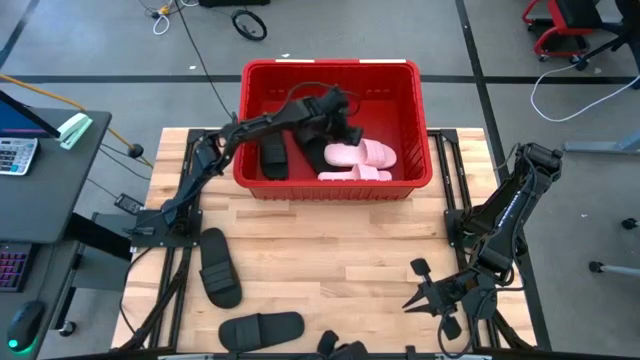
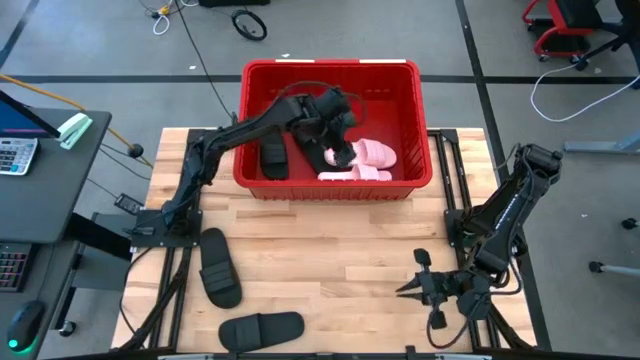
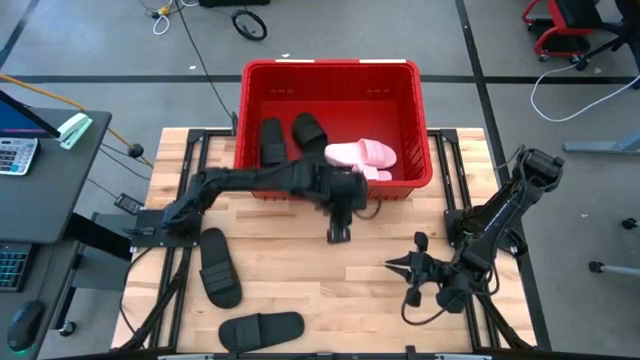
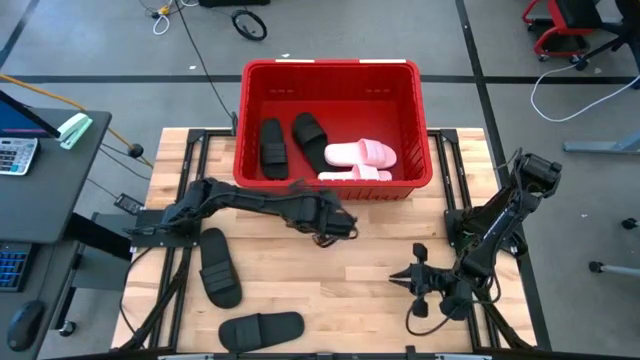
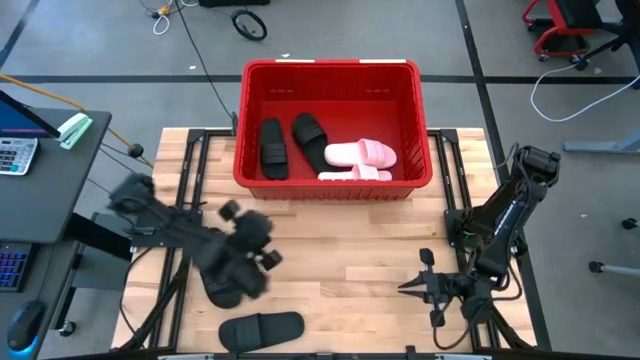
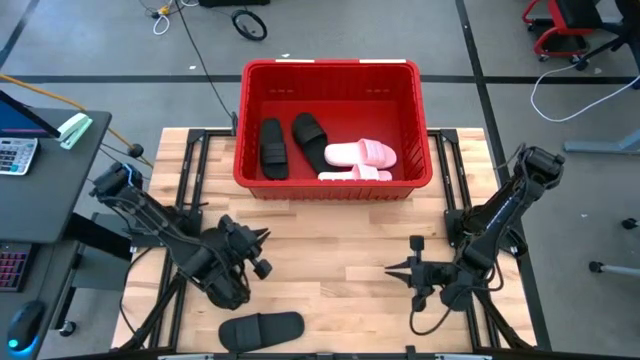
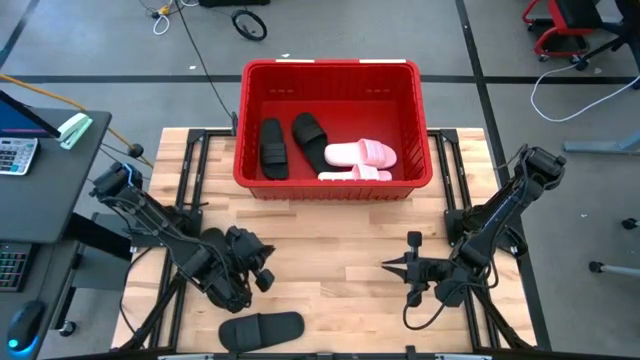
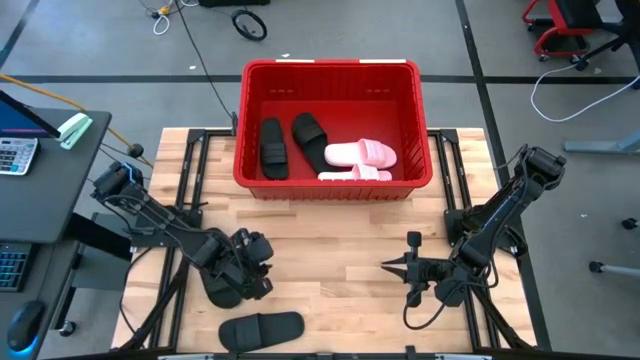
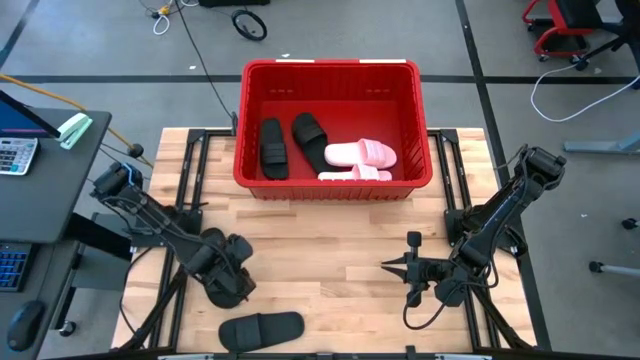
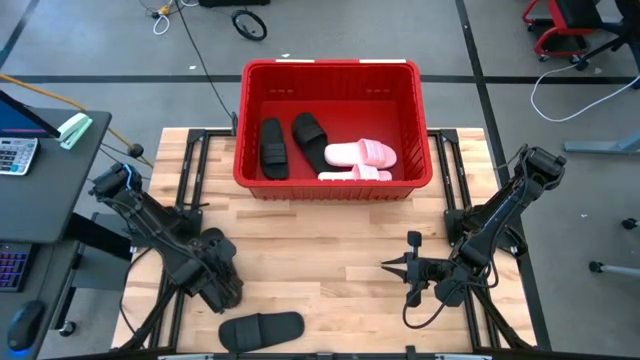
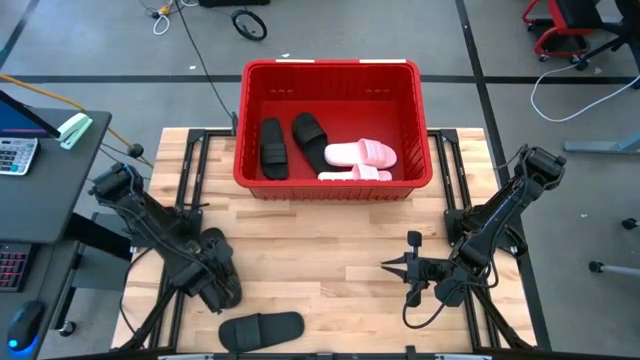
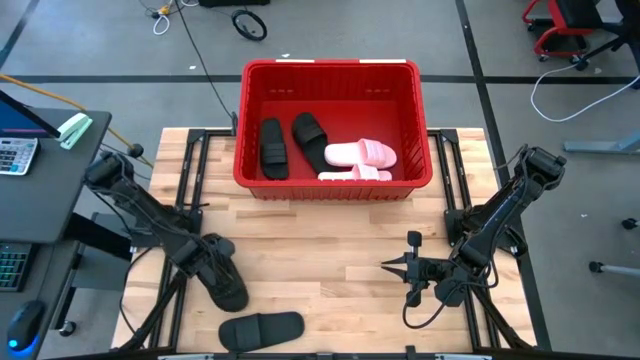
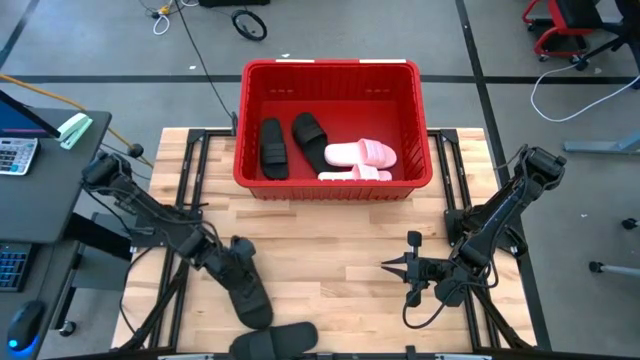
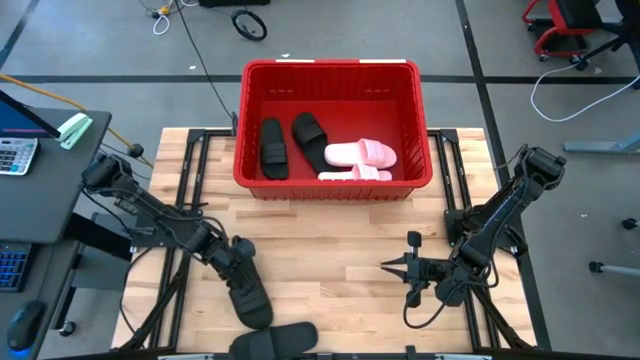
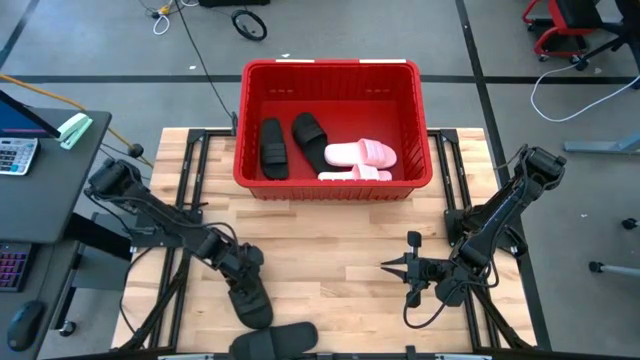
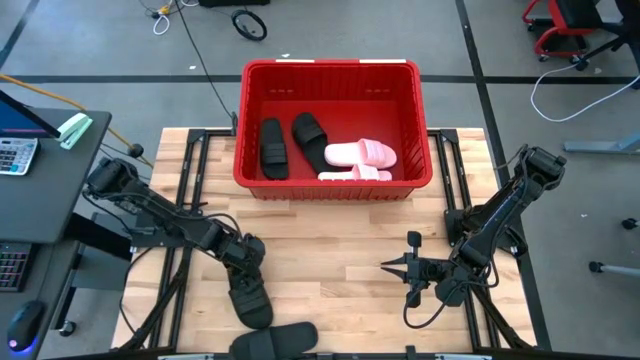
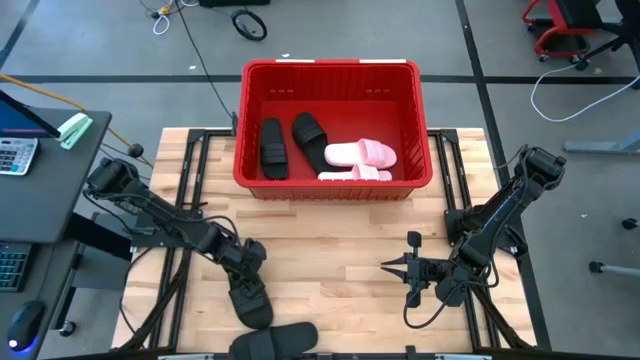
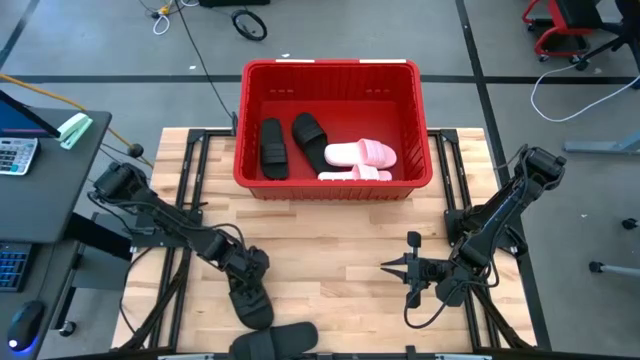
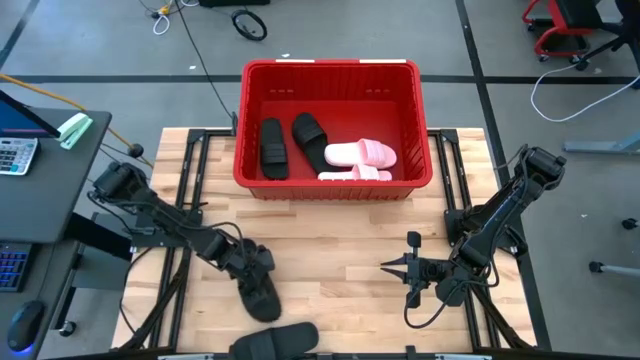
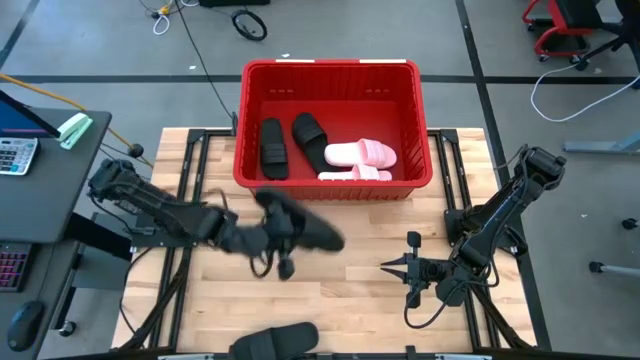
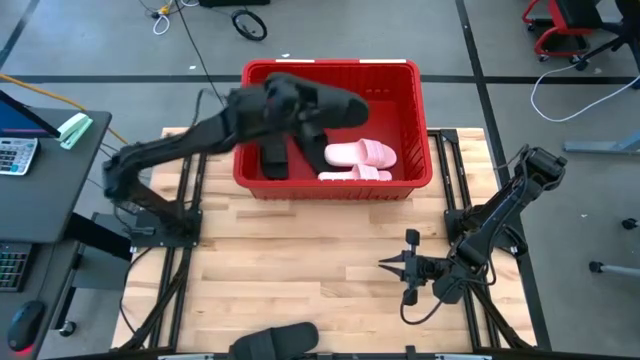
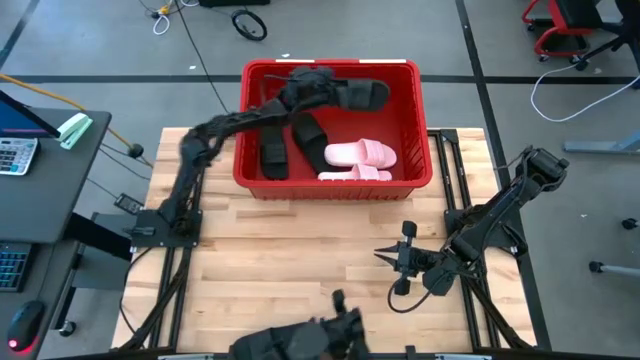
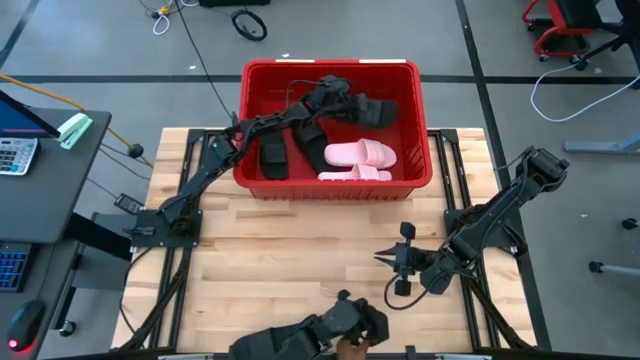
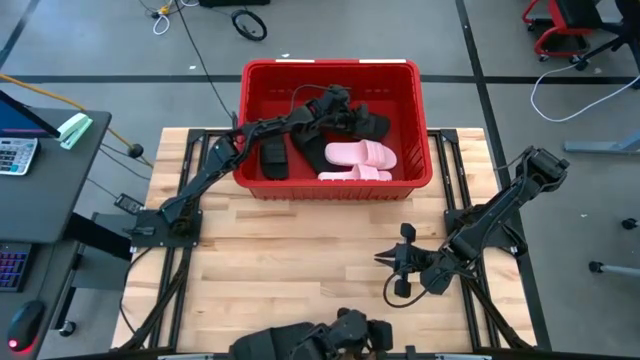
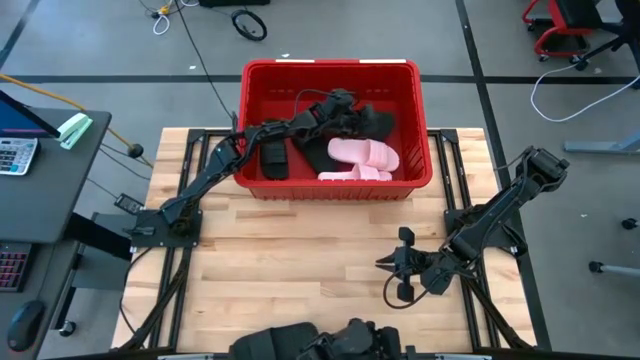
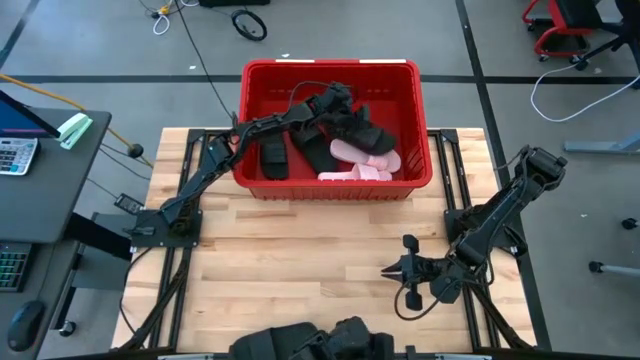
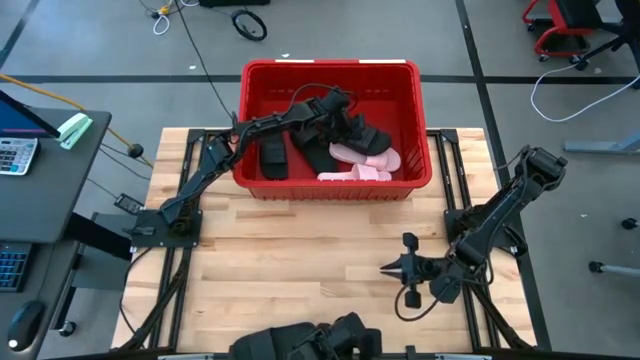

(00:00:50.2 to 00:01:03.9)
Task: Pick and place slides into bin
Put the top black slide into the red bin

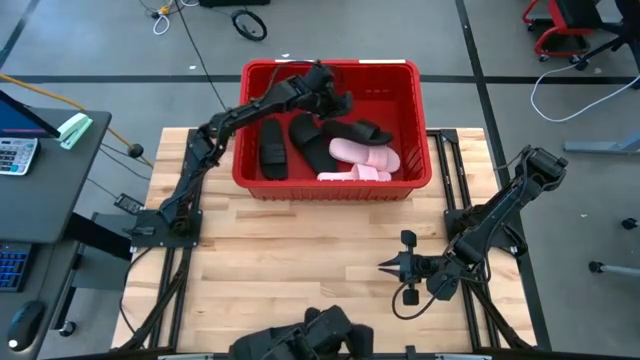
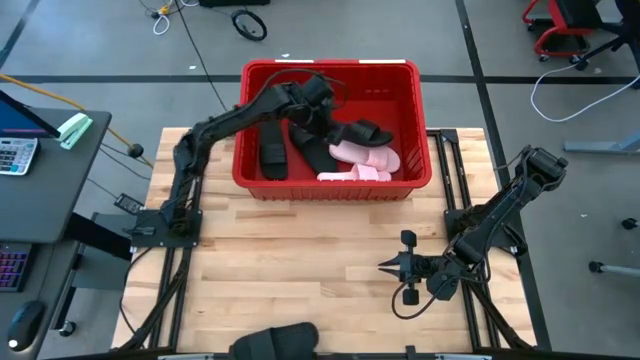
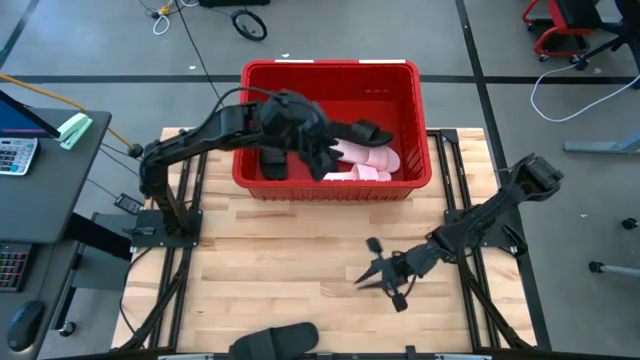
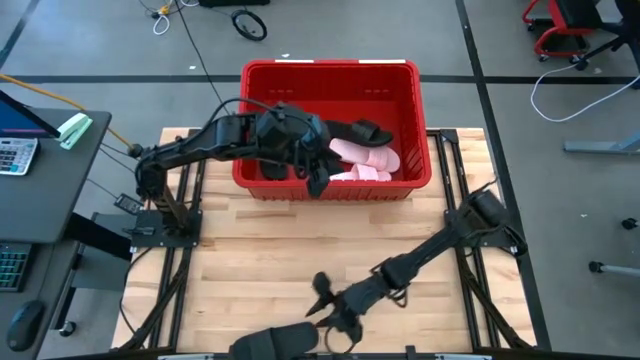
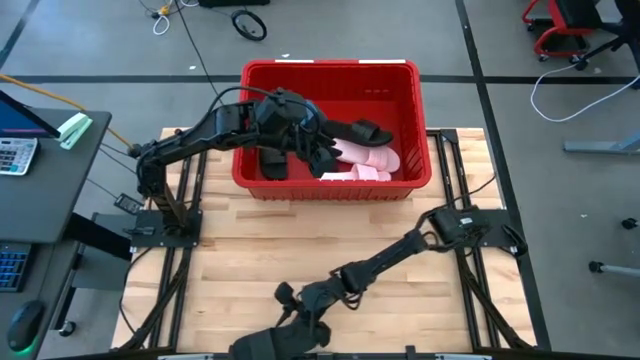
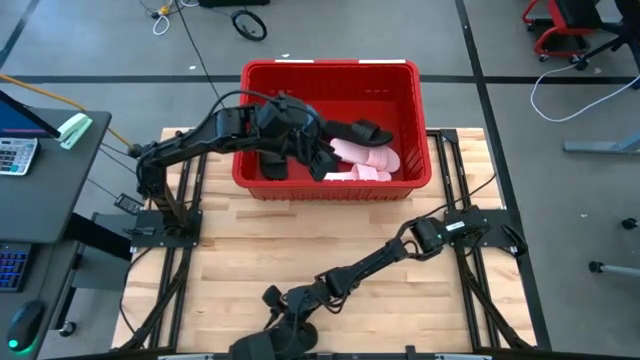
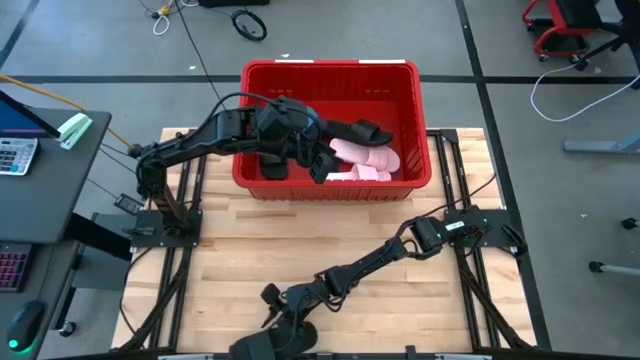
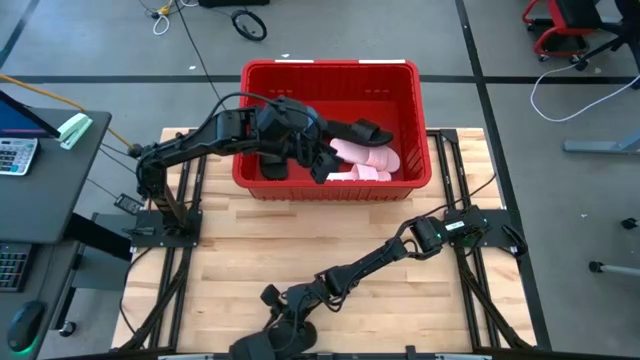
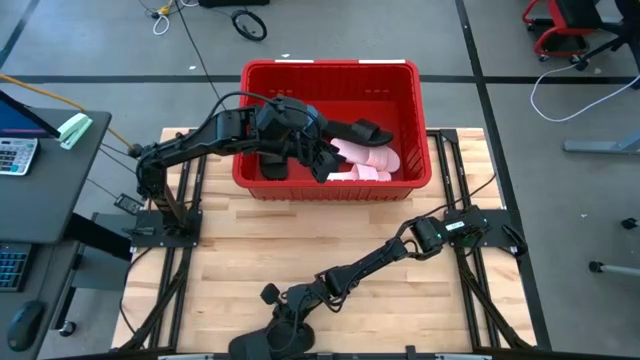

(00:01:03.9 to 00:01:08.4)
Put the black slide into the red bin

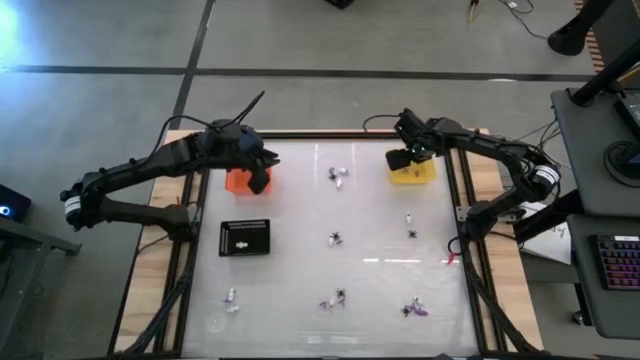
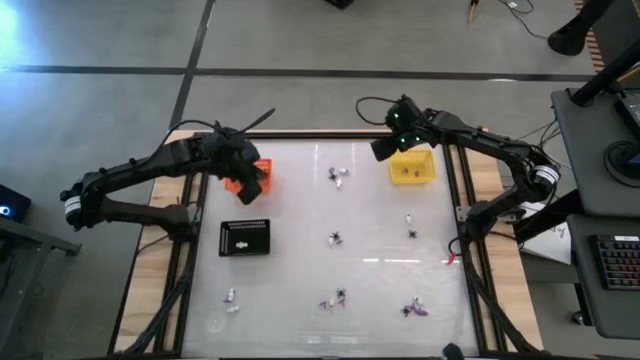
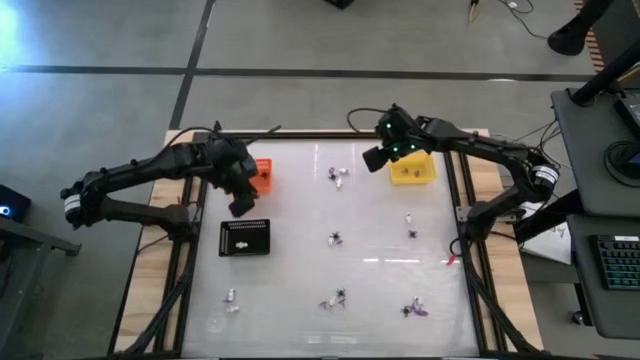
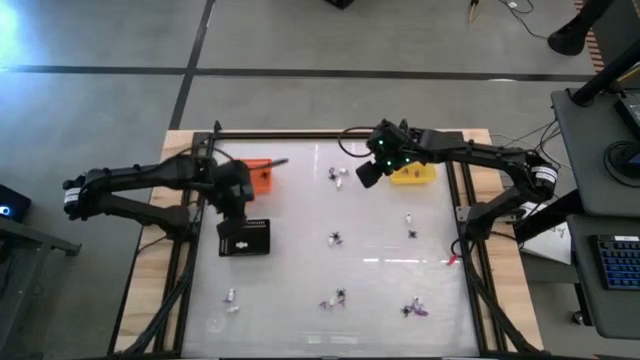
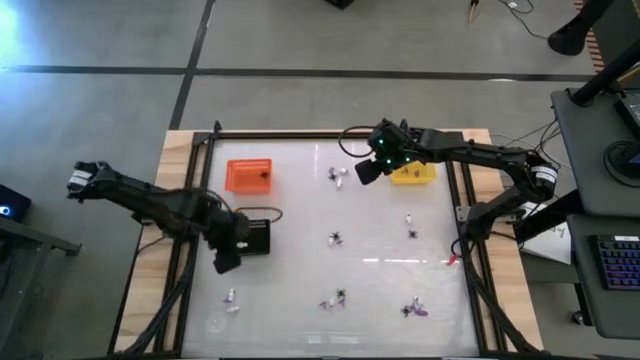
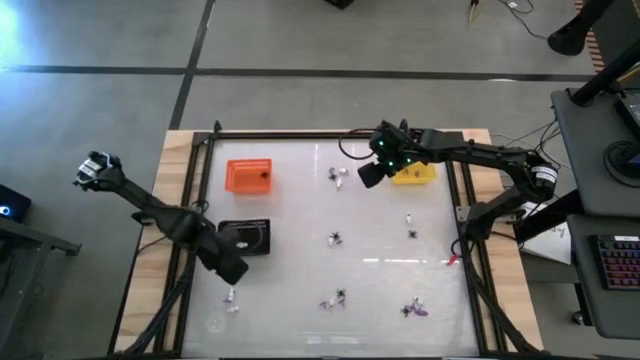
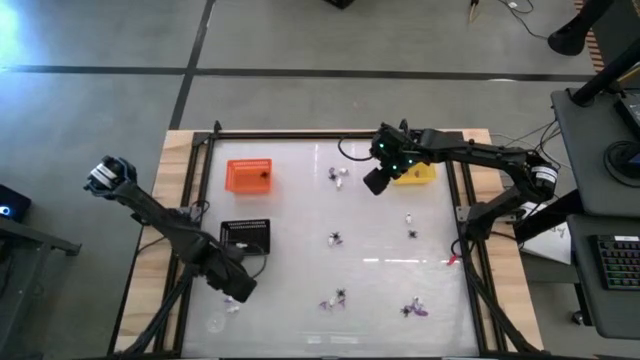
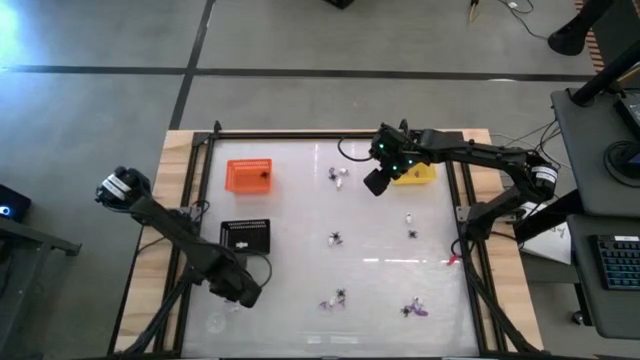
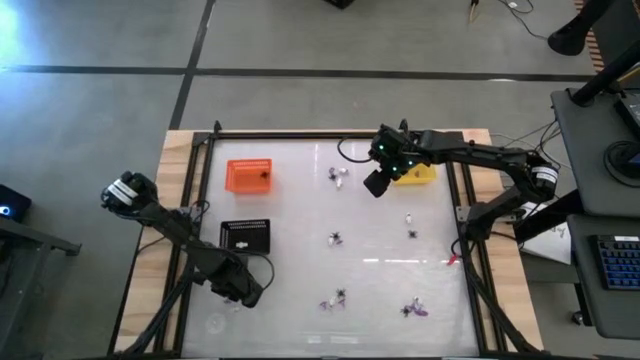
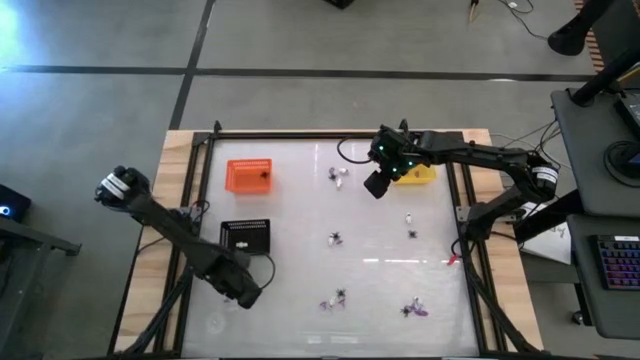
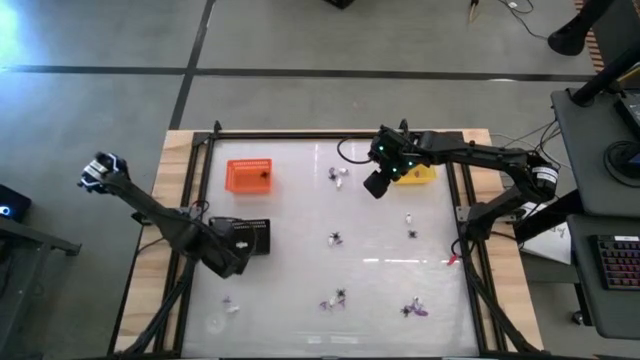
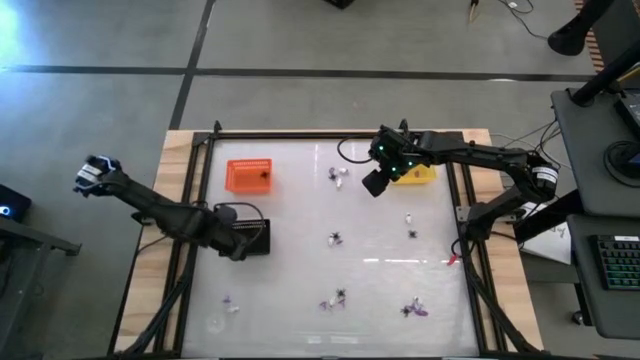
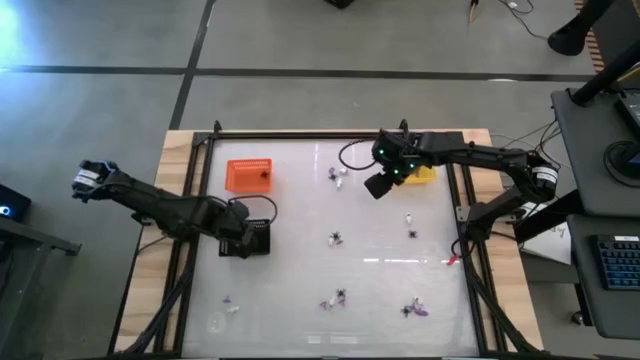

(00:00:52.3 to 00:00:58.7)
Task: Sort Halloween decoration
Put the white skeleton toy into the black bin
